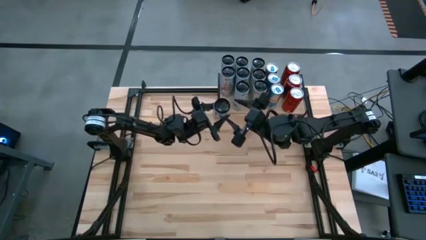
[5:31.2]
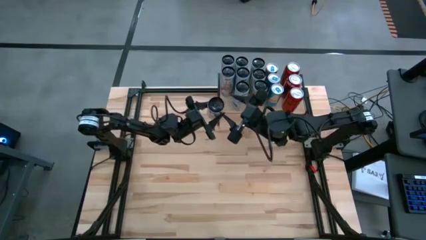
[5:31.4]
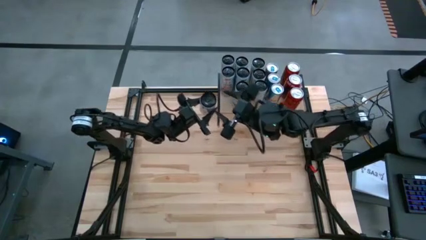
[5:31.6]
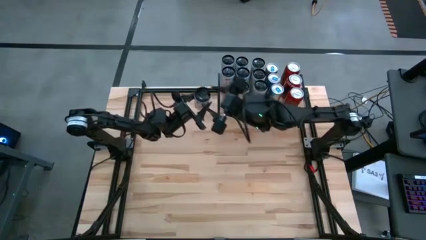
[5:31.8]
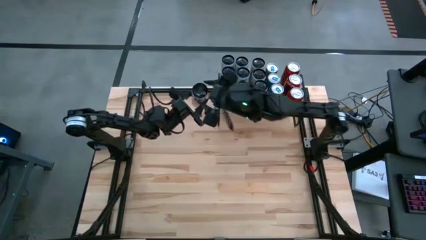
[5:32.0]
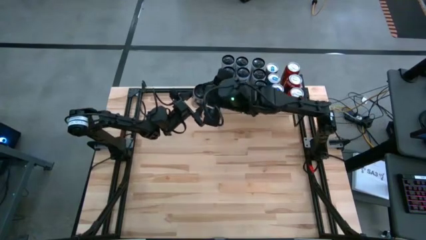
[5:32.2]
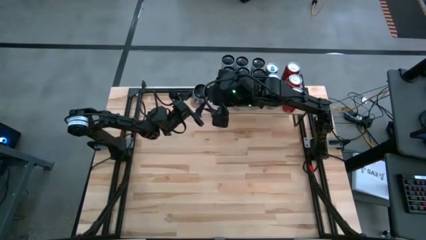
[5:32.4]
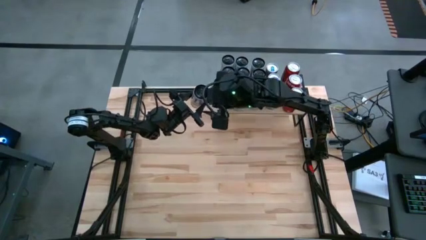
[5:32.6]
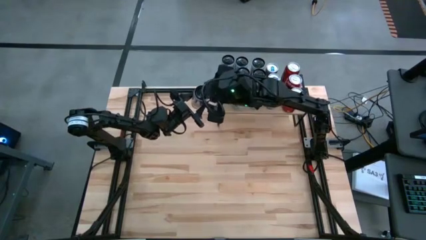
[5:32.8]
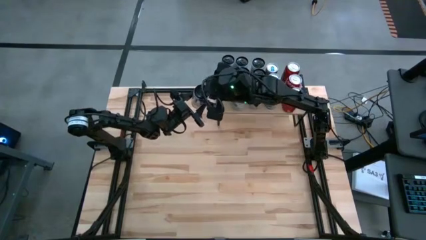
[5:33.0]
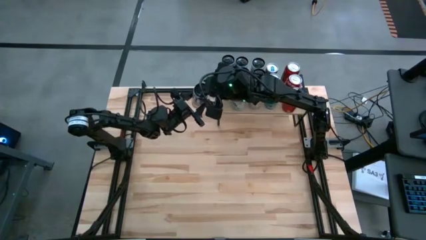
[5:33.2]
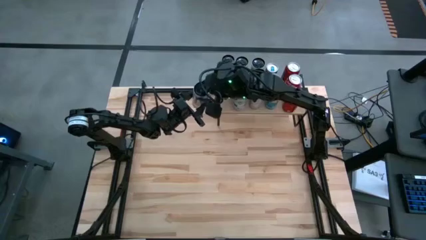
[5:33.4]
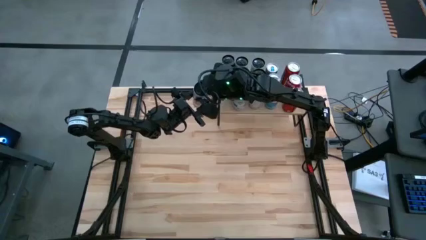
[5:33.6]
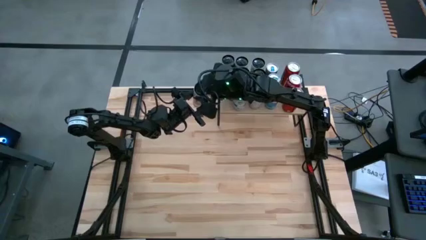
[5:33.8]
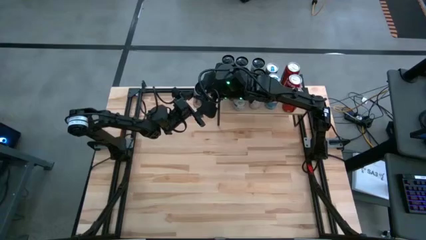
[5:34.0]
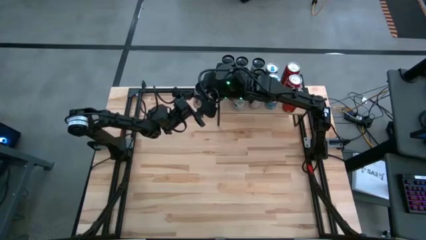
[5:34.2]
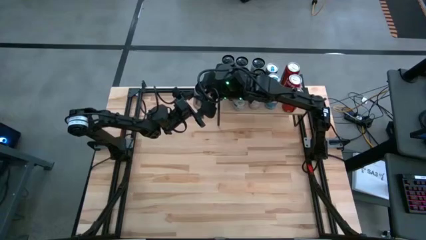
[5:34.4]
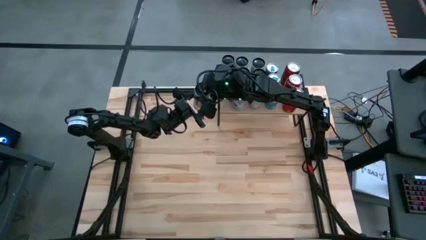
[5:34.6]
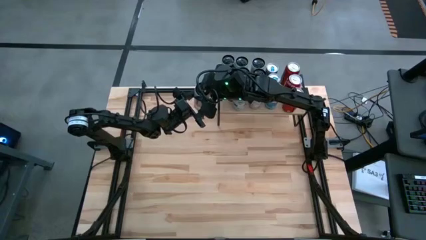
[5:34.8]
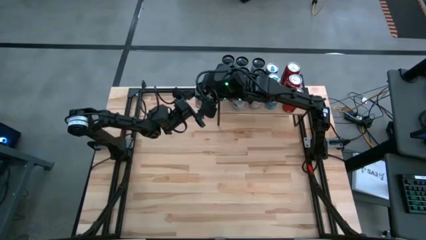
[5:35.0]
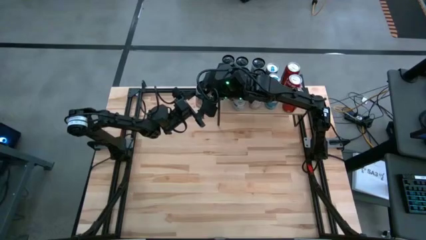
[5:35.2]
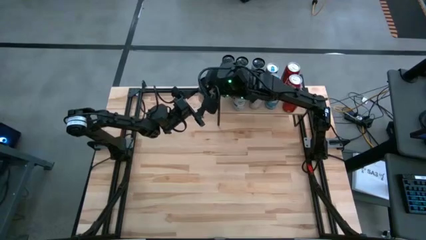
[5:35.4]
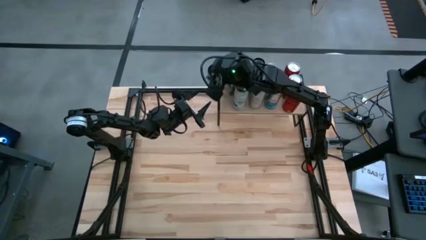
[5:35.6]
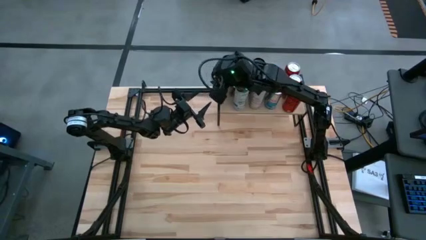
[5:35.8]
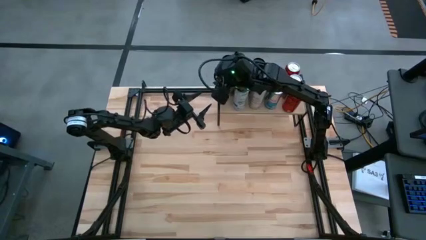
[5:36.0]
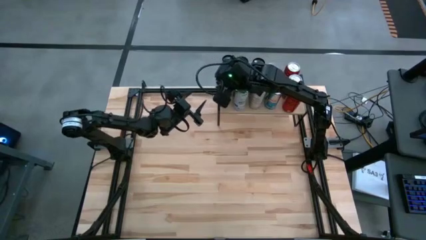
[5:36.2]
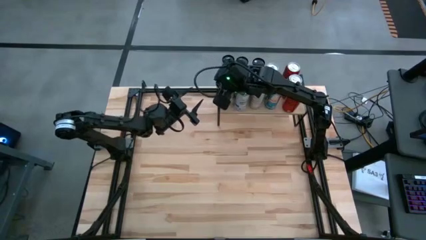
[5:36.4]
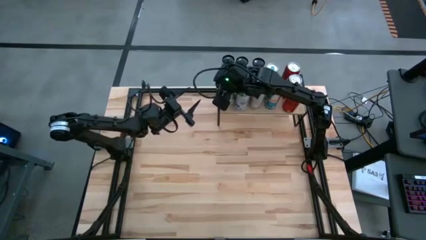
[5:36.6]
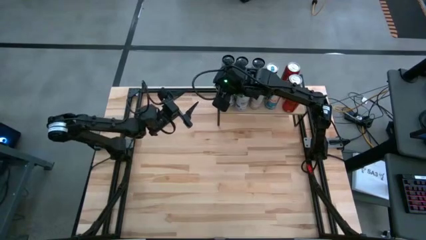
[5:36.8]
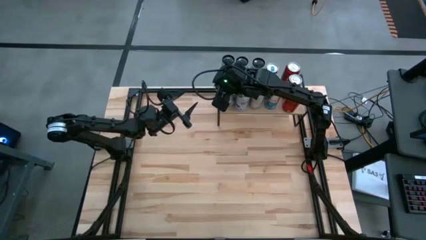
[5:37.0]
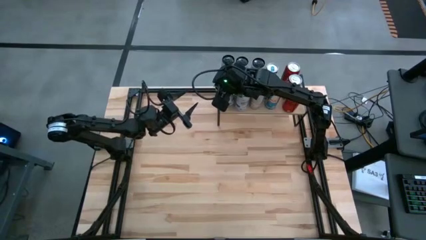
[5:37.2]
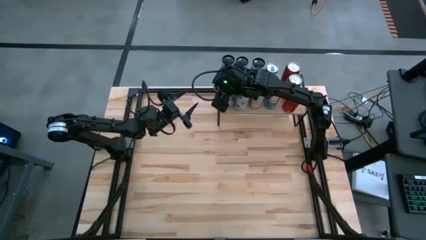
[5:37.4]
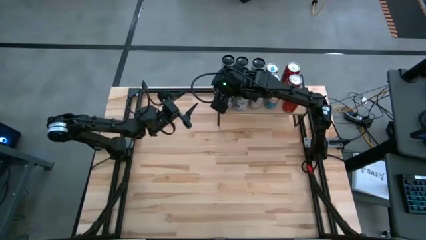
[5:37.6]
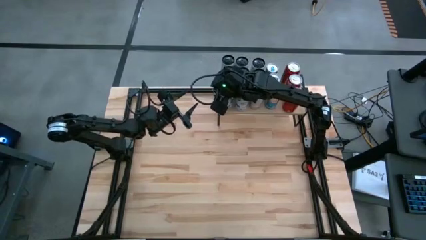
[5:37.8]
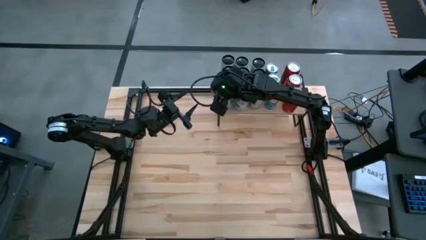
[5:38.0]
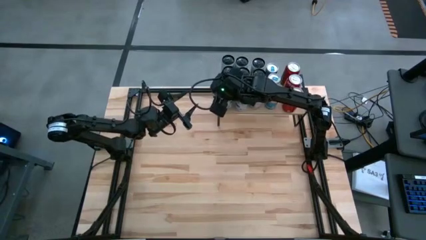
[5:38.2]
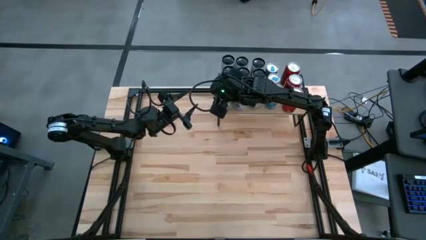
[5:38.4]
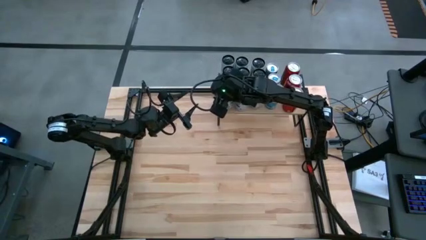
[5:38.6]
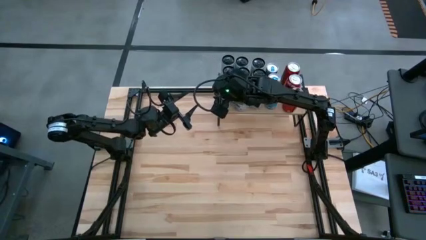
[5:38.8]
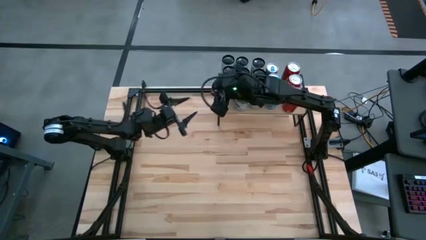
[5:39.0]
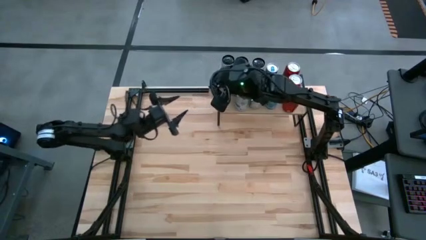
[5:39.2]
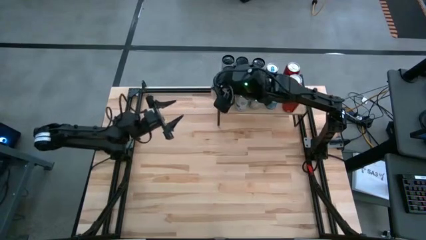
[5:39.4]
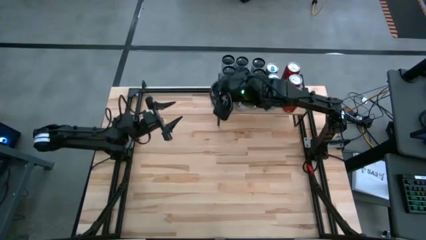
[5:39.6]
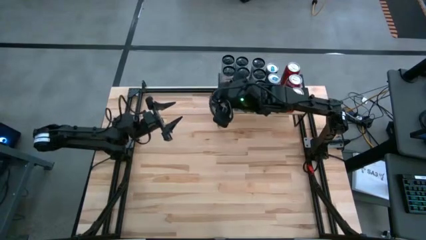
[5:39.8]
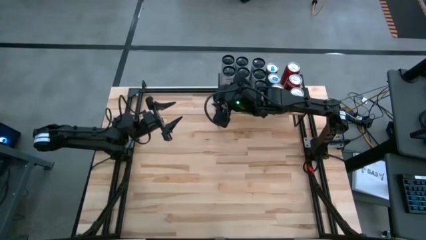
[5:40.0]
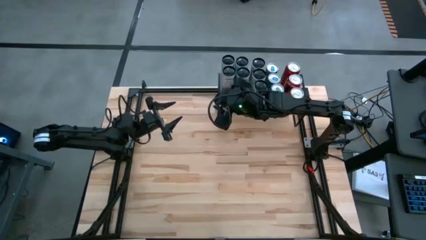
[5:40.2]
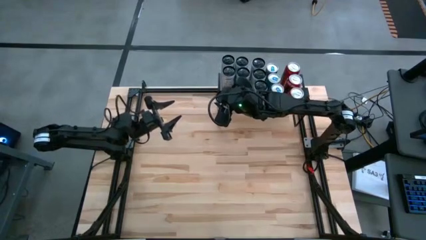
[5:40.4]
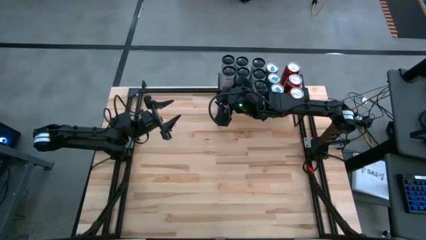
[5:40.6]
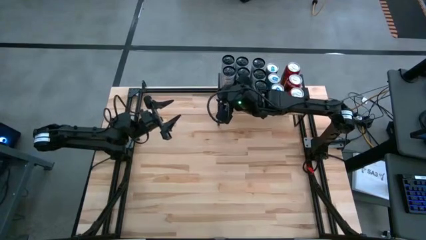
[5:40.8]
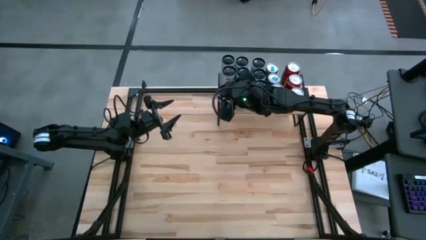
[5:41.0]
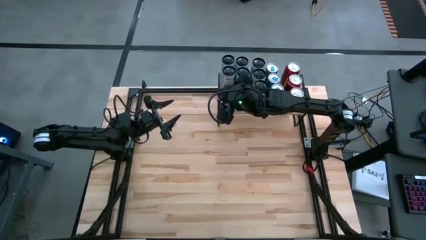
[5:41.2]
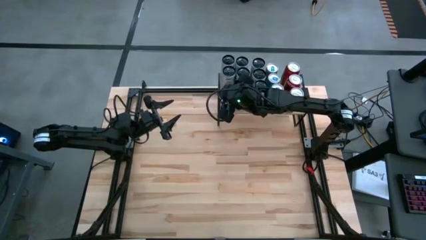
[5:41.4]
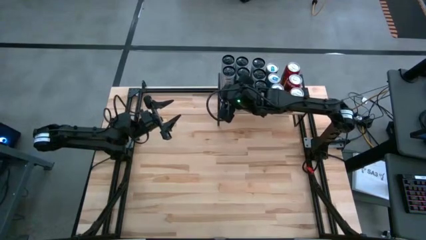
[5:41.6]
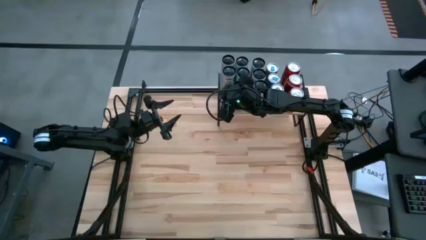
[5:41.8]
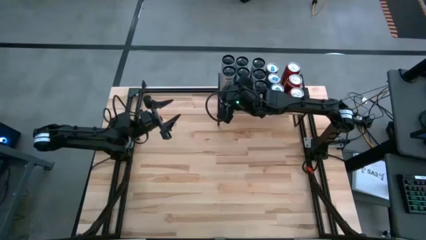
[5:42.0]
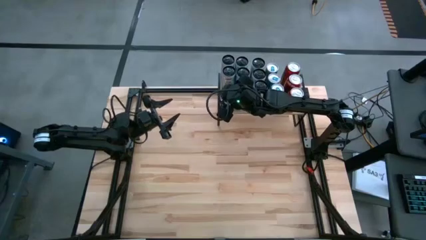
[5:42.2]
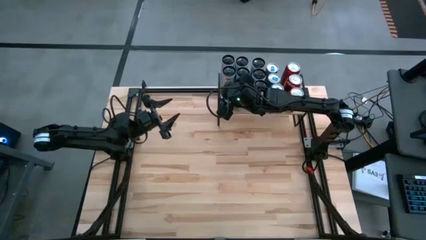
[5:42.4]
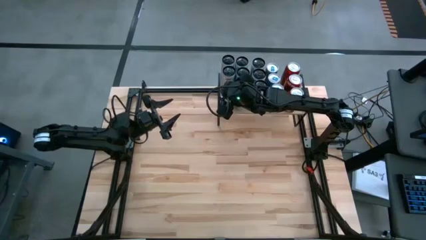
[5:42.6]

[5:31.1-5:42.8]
Task: Place canned beverage on shelf
Put the white pink soda can on the shelf aligned with the other white pink soda cans

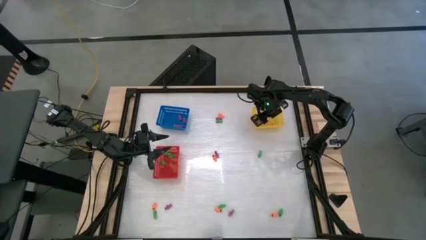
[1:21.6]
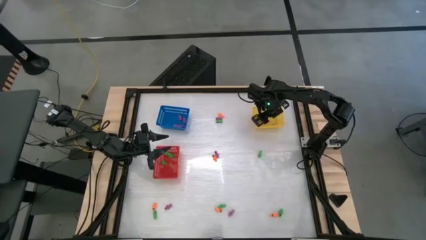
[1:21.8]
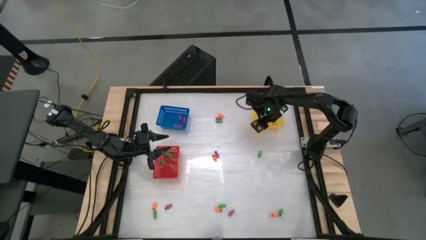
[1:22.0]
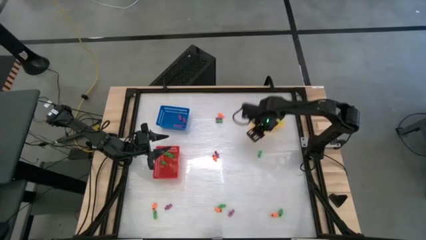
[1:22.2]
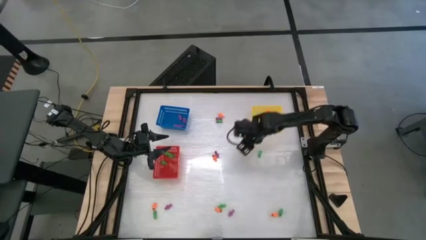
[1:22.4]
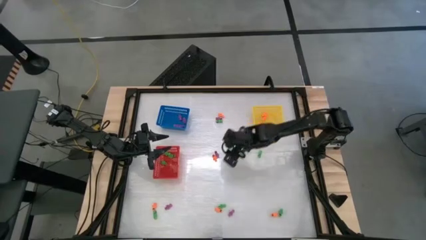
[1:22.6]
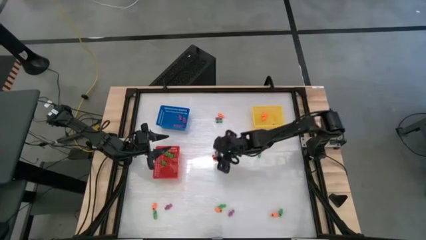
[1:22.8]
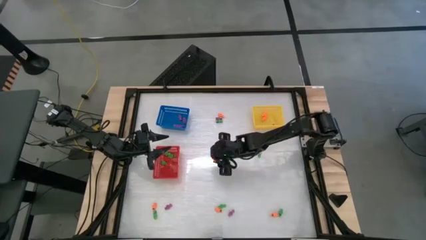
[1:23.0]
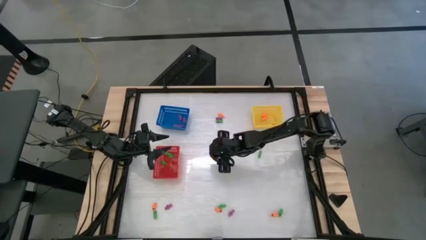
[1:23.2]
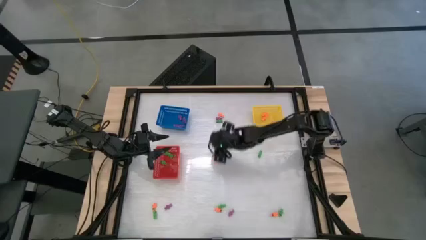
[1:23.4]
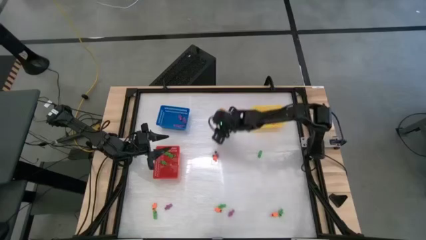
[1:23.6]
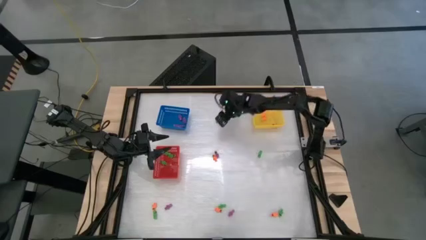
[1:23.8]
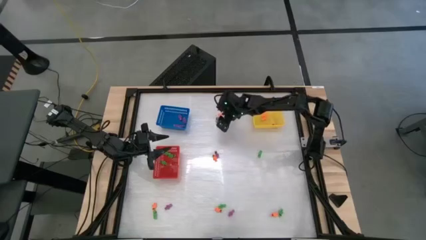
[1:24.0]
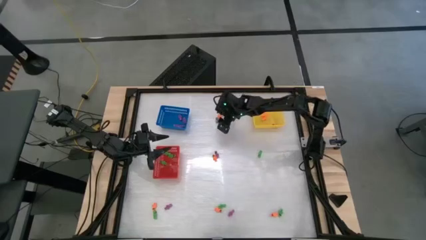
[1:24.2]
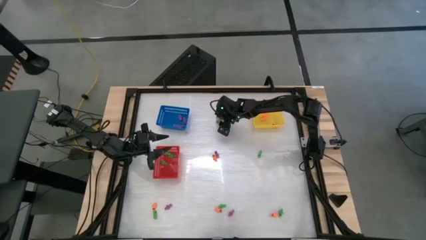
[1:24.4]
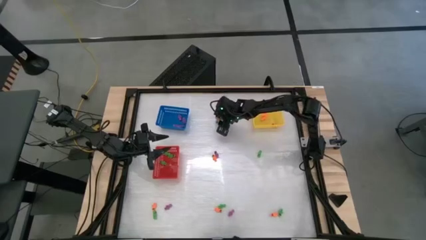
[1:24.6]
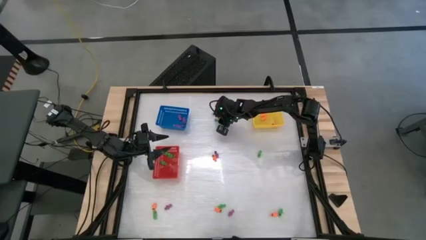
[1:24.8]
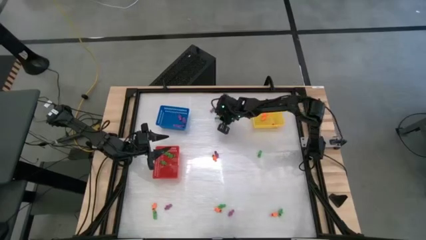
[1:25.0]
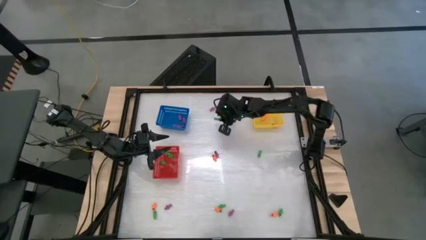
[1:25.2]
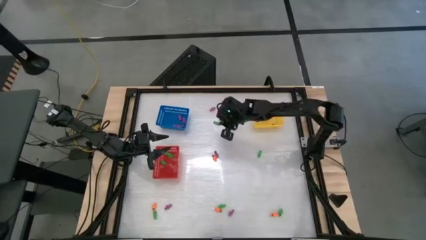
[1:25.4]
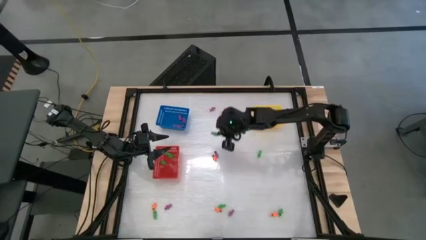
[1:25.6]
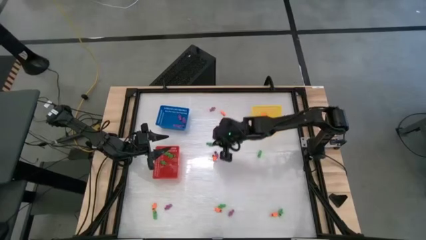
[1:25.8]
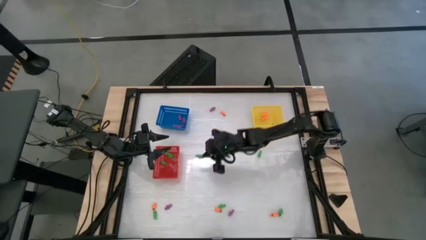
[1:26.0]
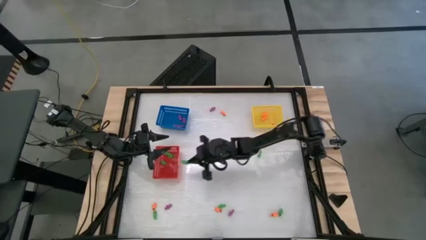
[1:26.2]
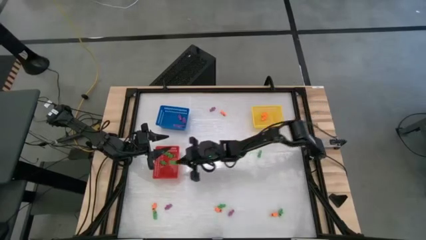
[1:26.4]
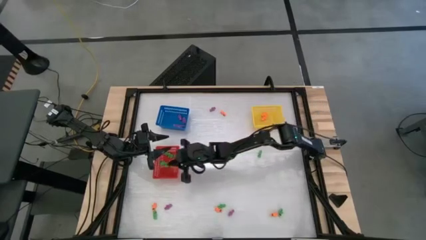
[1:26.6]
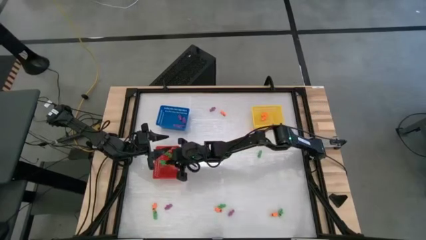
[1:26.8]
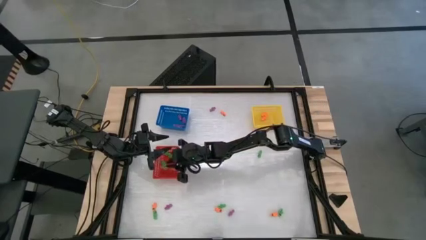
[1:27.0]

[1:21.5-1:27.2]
Task: Sort Halloween decoration
Put the green skeleton toy into the red bin
